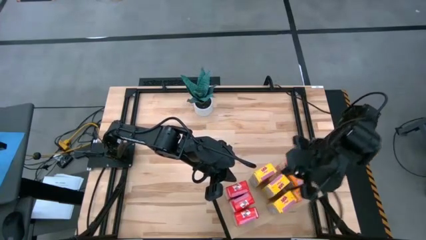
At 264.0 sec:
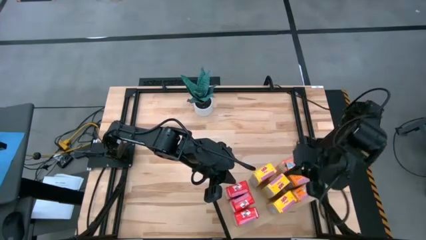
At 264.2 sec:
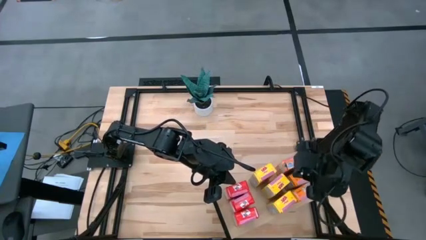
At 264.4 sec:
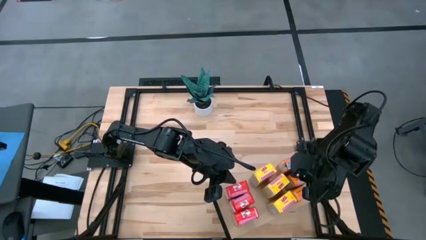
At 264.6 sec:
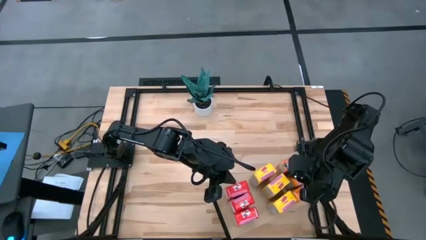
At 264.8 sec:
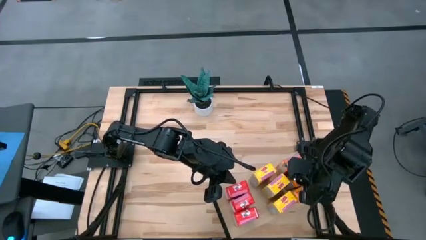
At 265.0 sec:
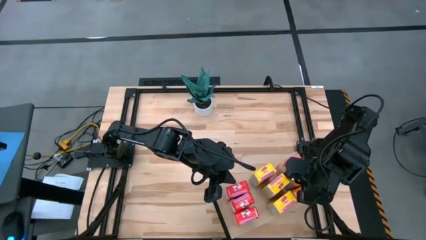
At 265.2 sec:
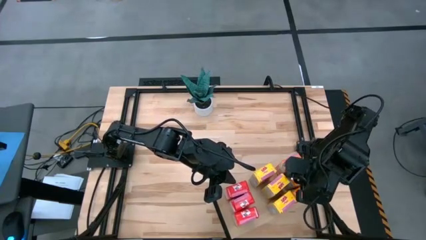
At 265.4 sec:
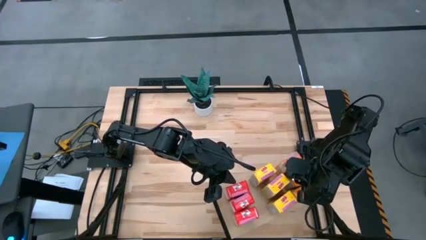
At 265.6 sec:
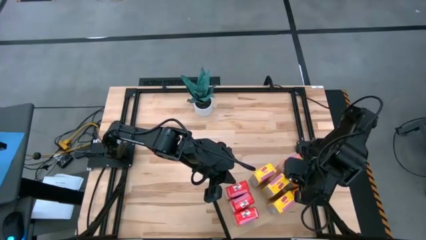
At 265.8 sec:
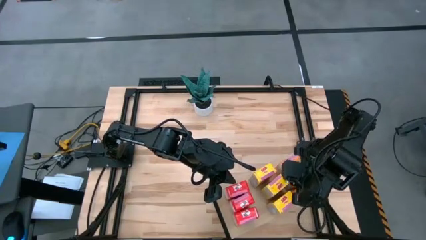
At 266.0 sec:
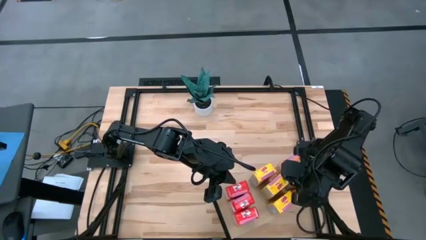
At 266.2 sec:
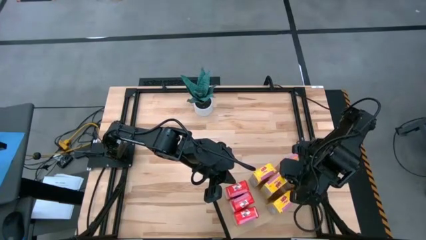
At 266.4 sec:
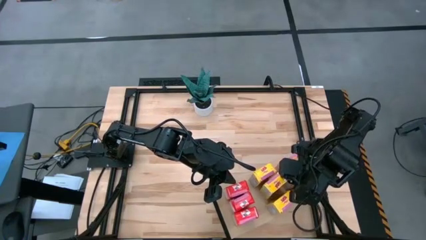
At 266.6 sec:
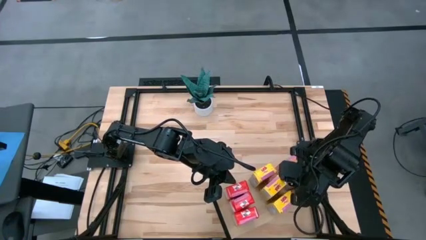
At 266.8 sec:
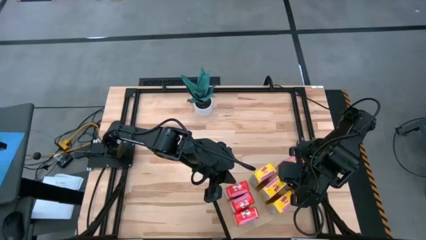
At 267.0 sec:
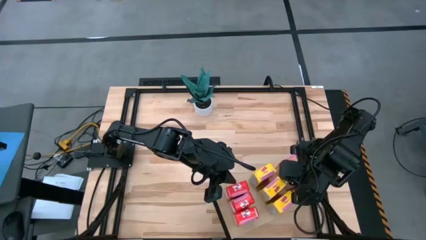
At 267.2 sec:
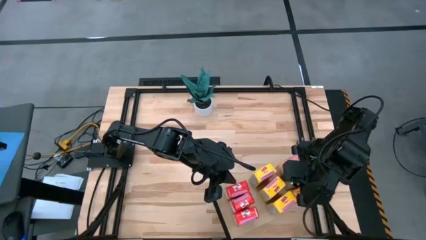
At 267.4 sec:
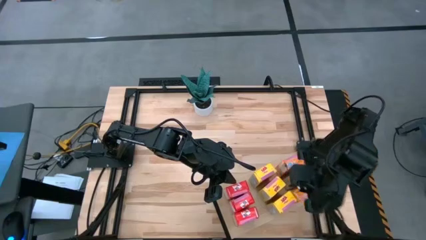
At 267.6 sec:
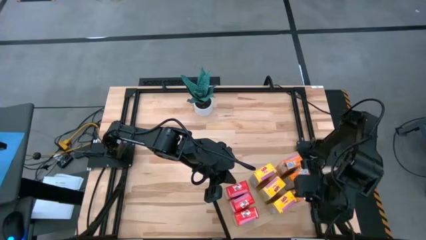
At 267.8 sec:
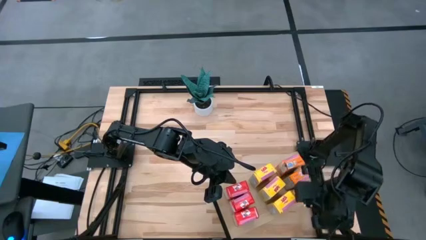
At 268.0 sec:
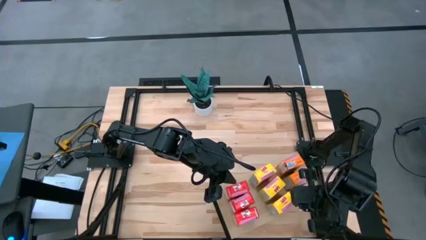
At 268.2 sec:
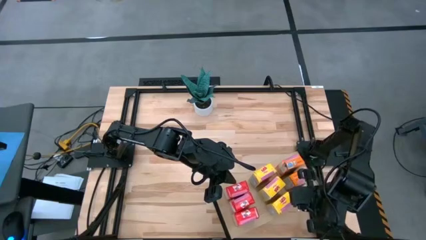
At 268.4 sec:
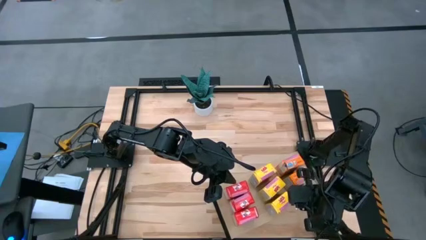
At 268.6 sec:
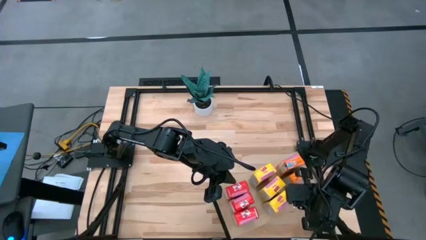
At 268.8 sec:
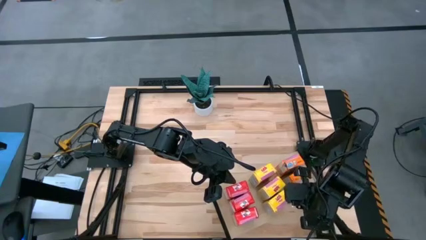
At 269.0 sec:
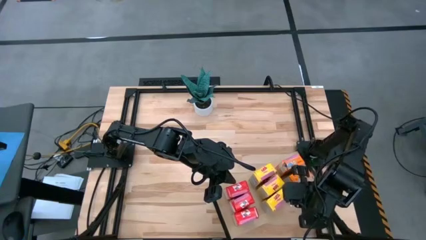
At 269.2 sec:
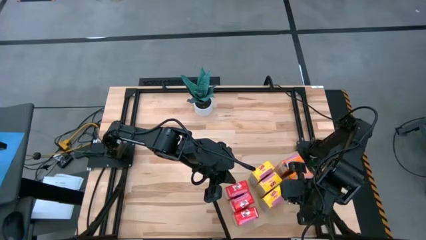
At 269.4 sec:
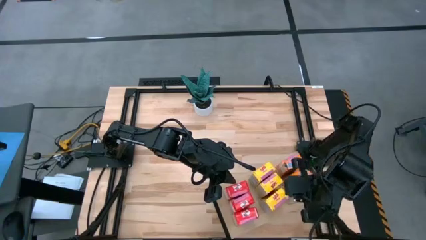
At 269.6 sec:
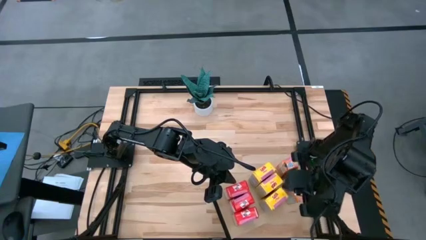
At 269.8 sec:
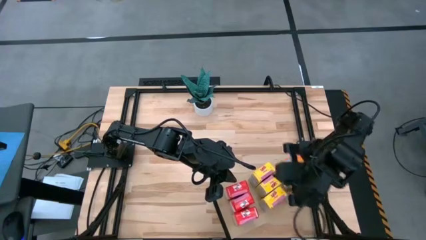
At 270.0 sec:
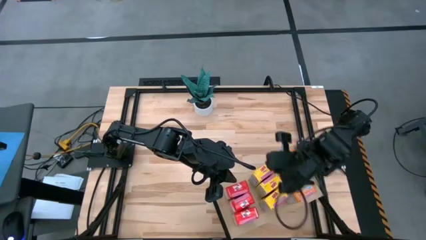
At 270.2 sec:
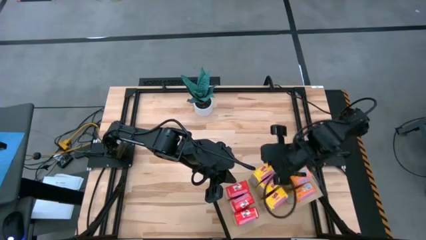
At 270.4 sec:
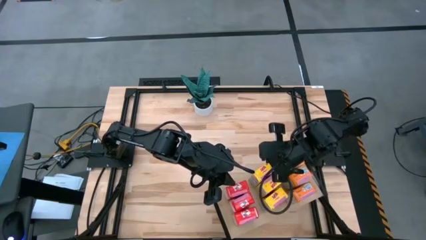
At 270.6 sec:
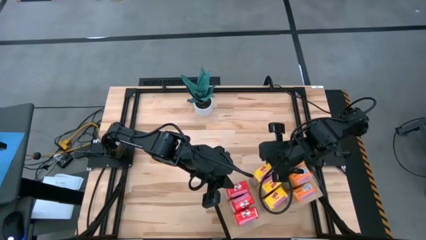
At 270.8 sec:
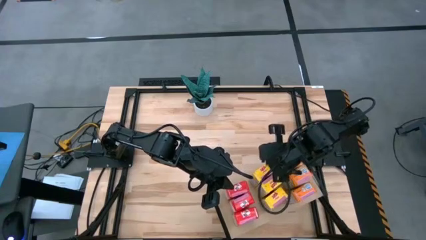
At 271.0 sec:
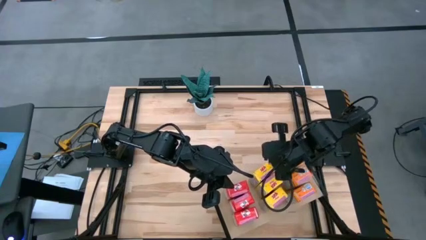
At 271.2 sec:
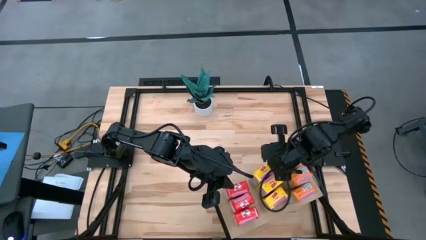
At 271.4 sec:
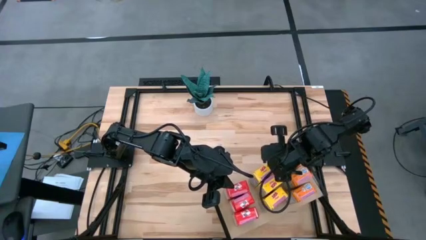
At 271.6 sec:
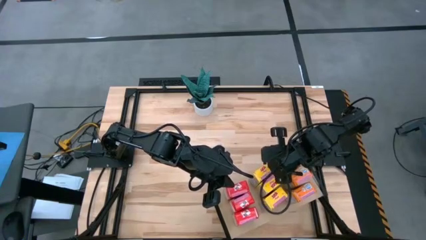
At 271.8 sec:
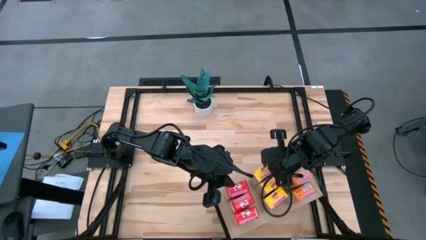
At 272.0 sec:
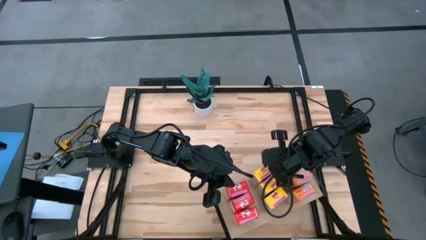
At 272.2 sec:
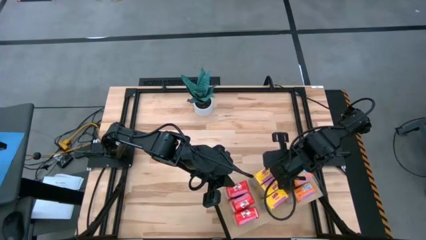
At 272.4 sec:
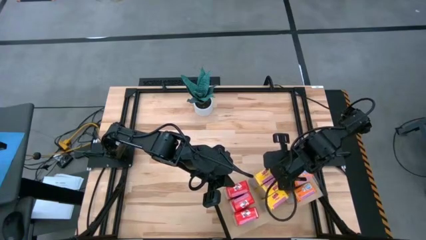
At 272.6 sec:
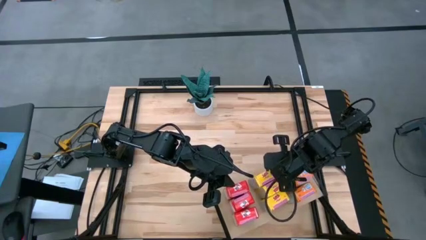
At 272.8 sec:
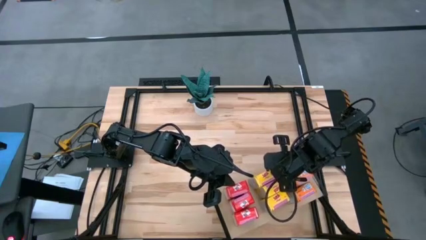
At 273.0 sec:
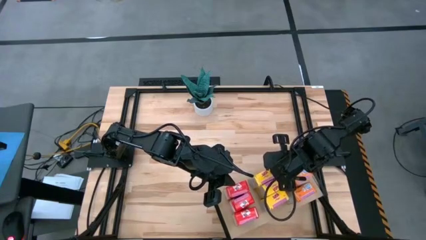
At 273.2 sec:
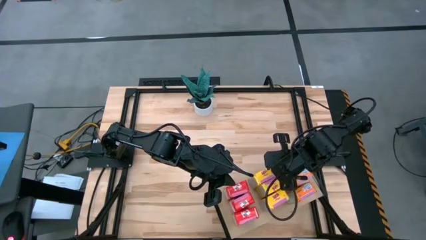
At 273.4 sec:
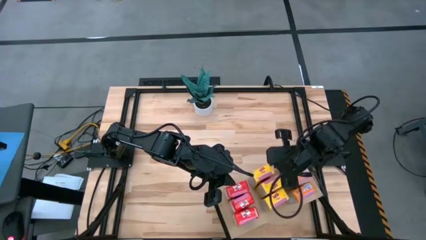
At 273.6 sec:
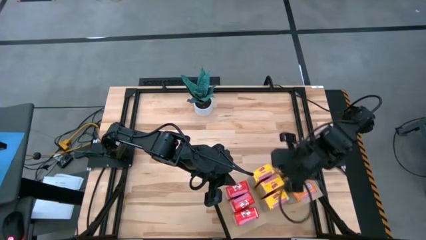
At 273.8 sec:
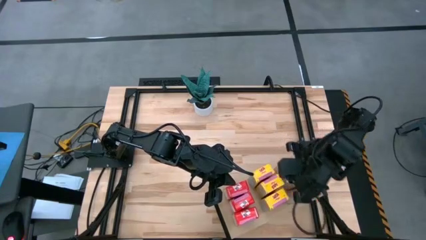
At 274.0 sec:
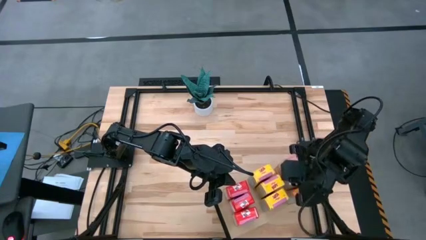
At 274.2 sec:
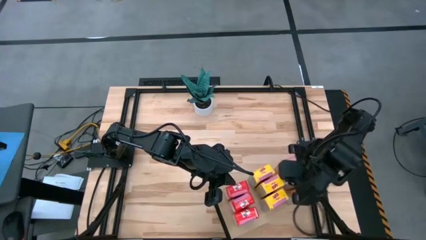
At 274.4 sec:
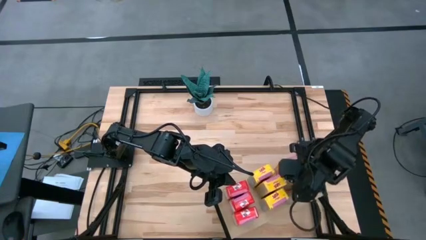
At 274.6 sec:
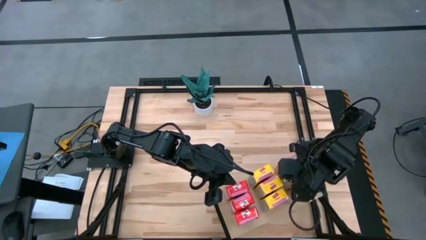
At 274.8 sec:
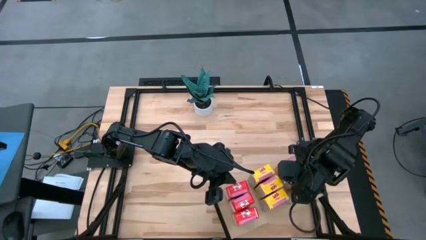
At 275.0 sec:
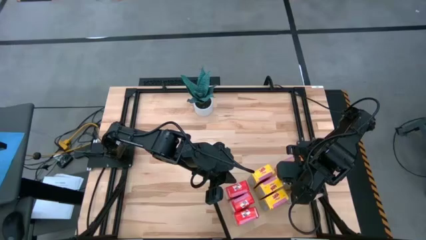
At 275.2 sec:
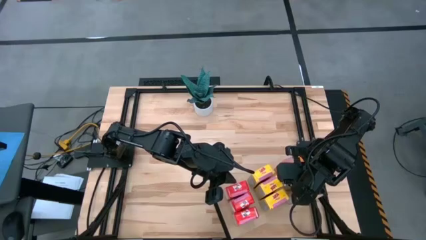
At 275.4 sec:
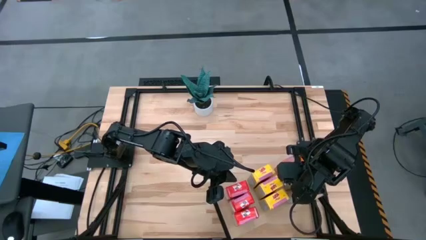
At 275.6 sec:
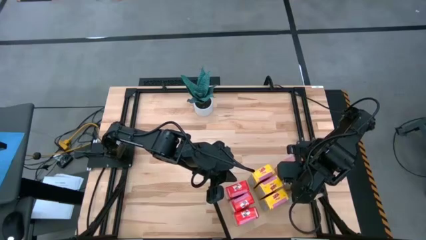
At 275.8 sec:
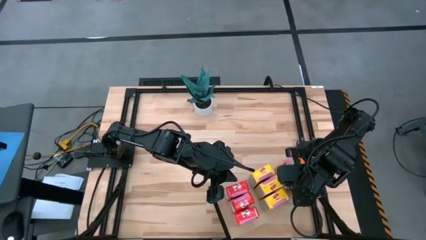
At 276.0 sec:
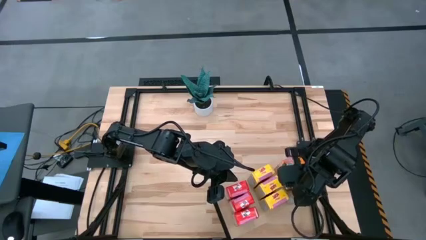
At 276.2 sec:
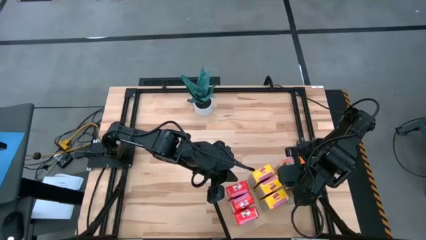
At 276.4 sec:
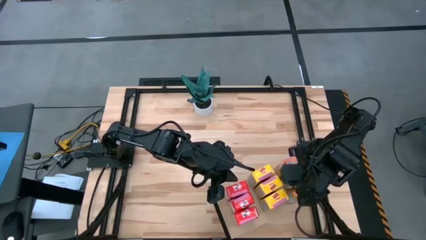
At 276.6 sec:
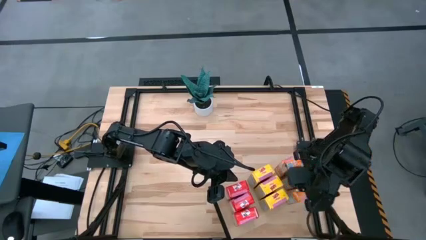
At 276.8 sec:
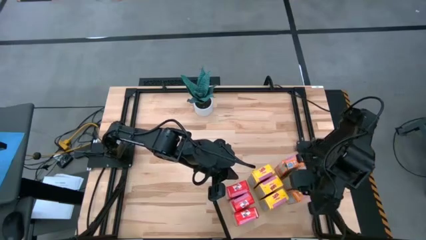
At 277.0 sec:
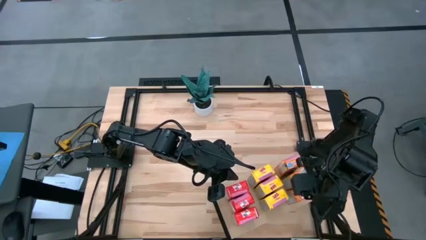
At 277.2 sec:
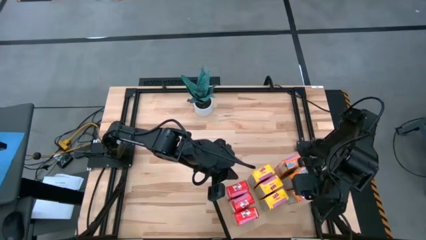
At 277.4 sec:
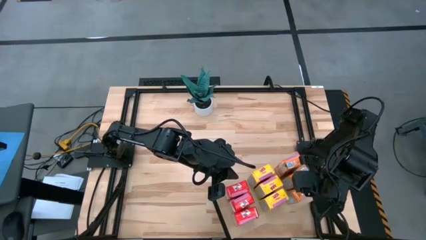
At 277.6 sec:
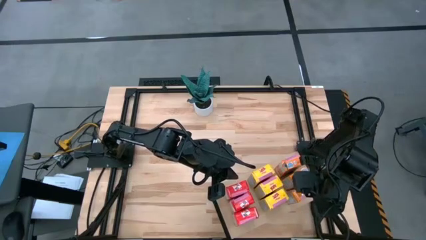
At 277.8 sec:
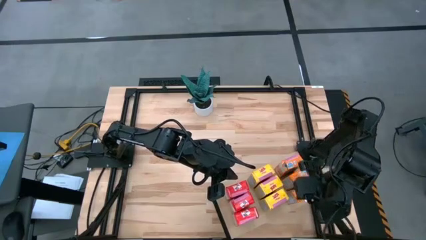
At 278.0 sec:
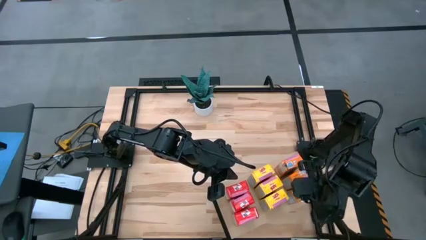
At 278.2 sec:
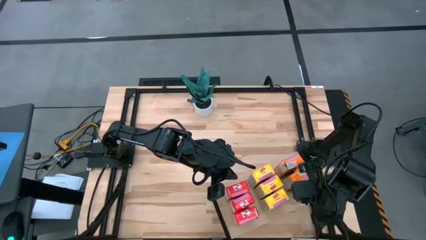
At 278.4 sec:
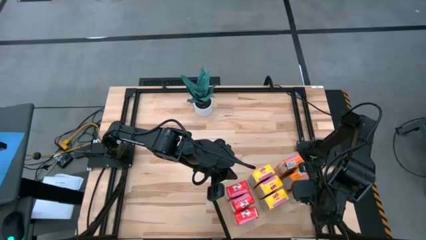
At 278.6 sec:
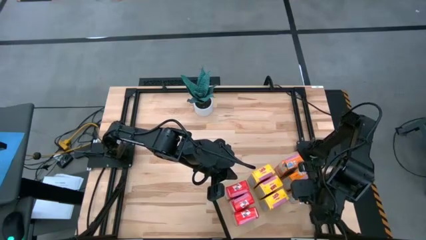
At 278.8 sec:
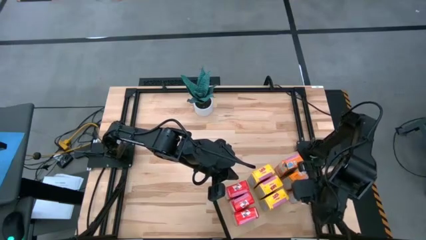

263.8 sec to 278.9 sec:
Task: Stack cereal on shelf
Adjust the colored cereal boxes on the shelf
